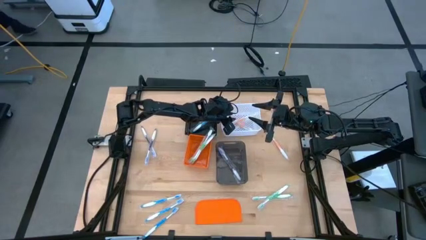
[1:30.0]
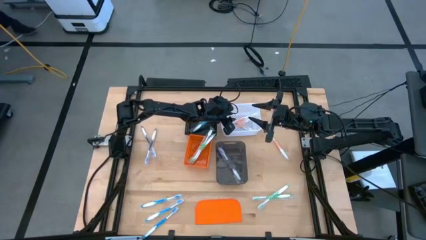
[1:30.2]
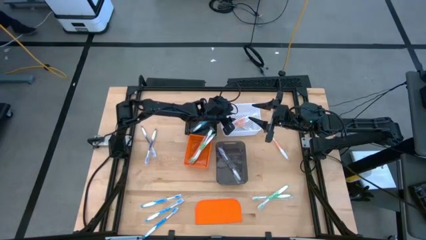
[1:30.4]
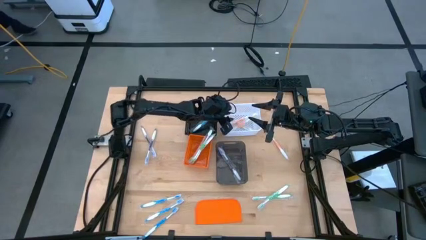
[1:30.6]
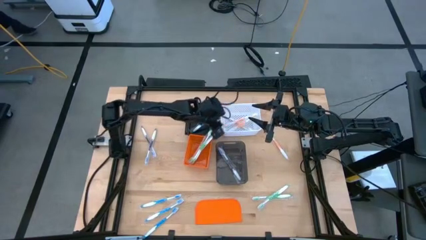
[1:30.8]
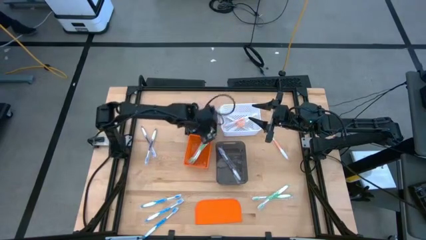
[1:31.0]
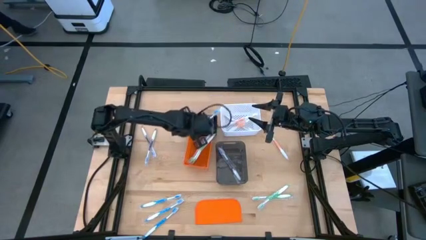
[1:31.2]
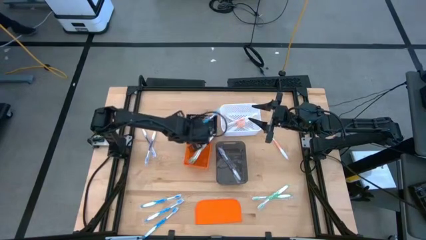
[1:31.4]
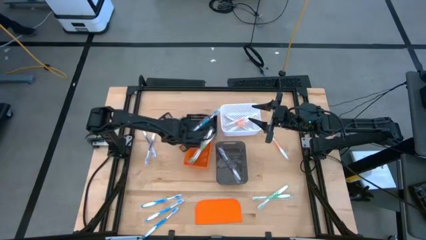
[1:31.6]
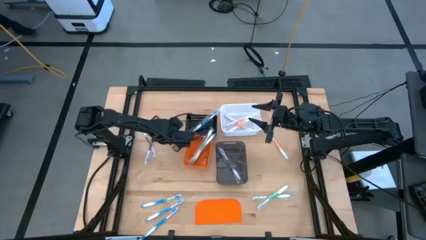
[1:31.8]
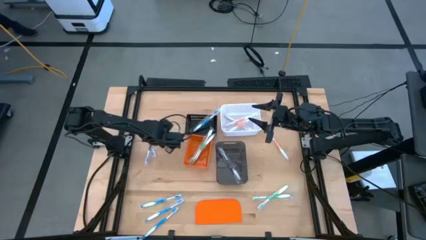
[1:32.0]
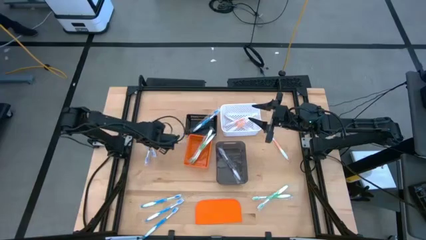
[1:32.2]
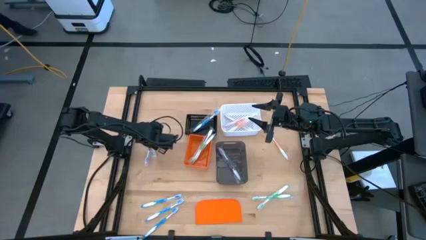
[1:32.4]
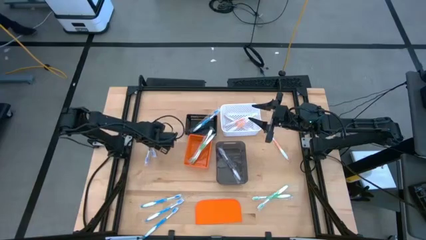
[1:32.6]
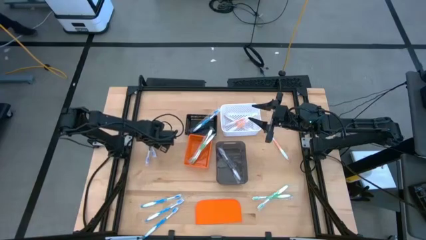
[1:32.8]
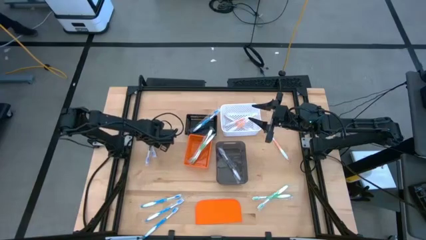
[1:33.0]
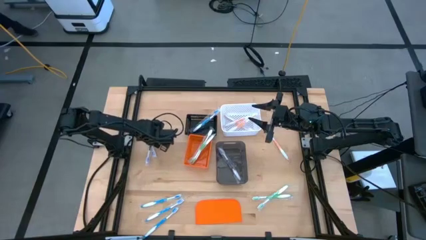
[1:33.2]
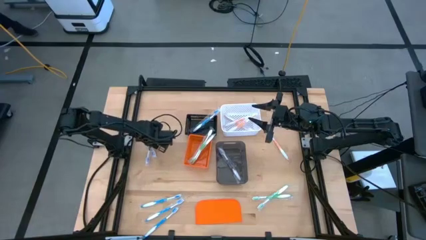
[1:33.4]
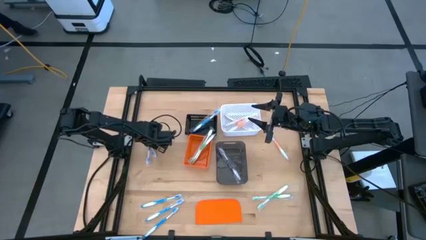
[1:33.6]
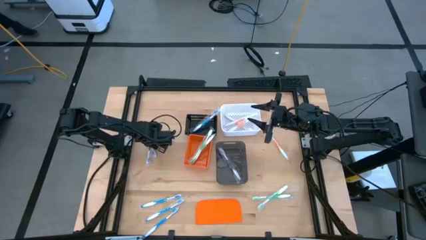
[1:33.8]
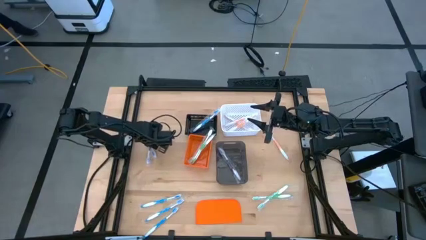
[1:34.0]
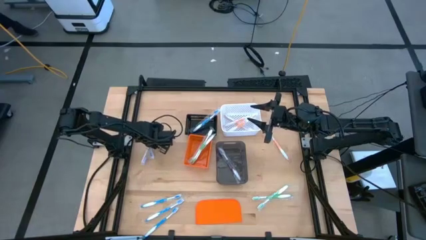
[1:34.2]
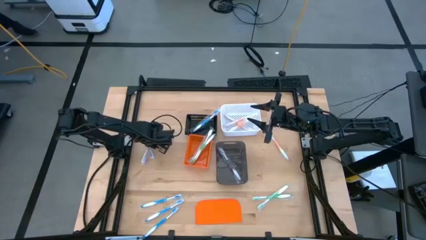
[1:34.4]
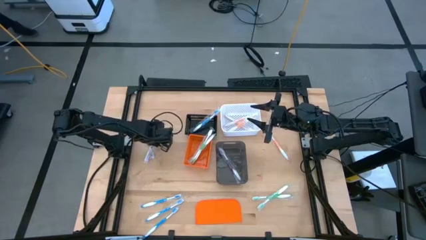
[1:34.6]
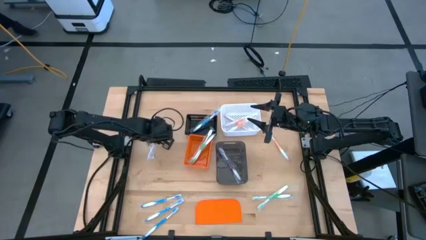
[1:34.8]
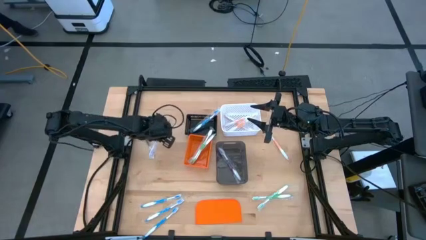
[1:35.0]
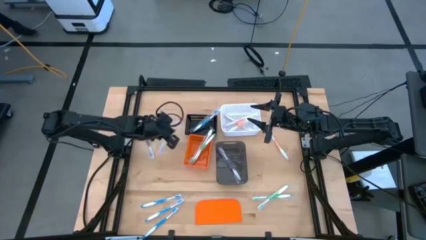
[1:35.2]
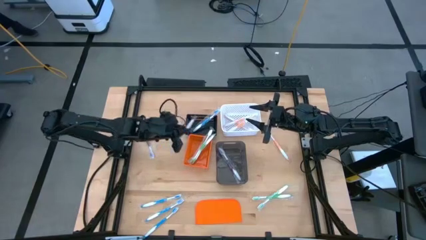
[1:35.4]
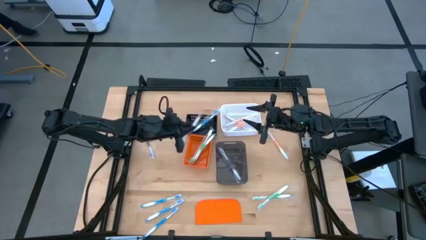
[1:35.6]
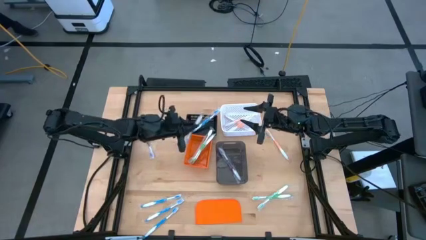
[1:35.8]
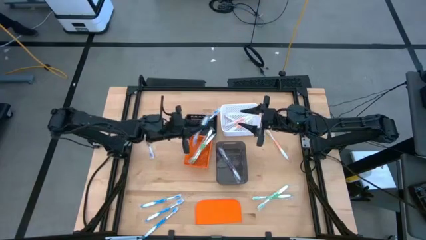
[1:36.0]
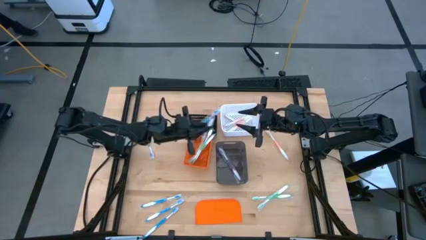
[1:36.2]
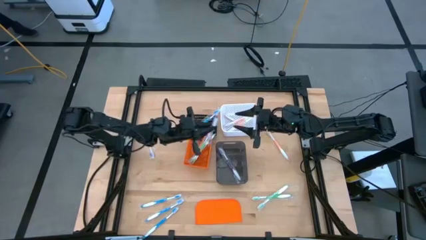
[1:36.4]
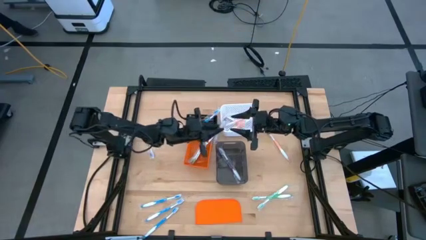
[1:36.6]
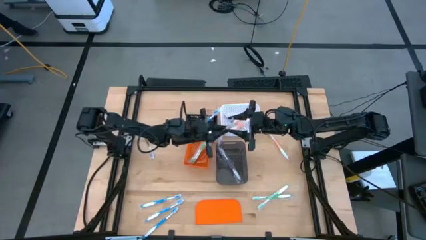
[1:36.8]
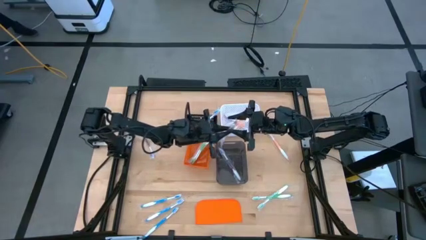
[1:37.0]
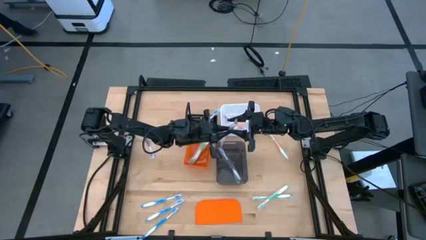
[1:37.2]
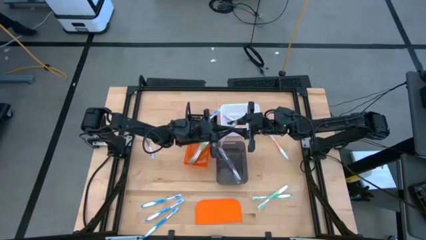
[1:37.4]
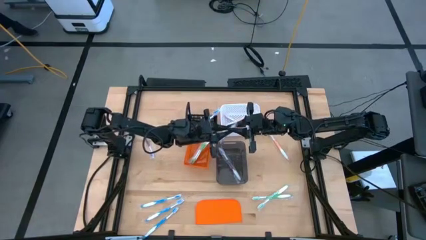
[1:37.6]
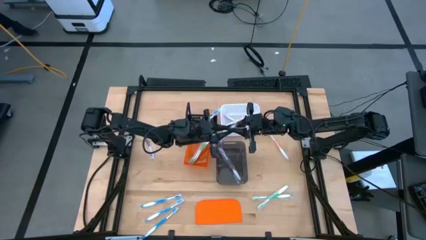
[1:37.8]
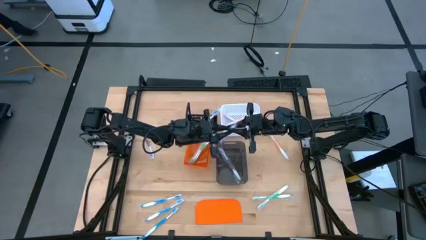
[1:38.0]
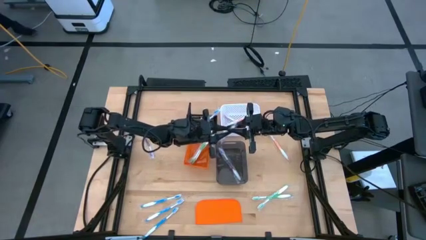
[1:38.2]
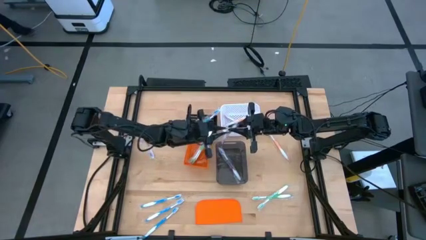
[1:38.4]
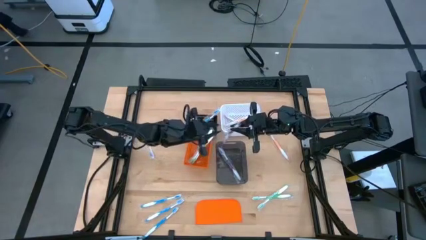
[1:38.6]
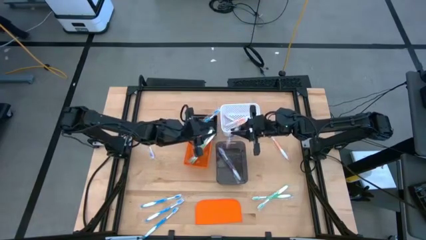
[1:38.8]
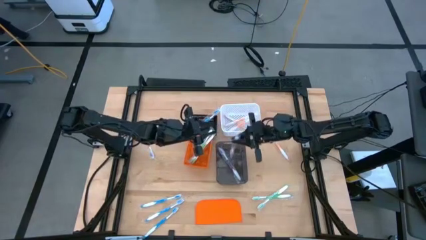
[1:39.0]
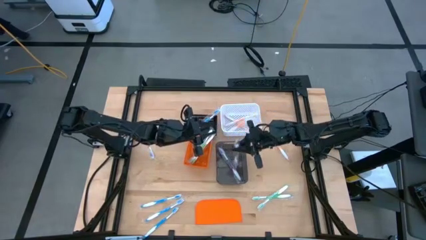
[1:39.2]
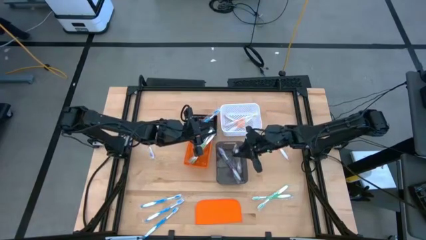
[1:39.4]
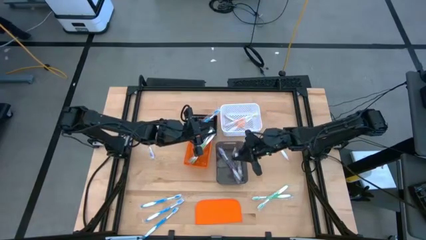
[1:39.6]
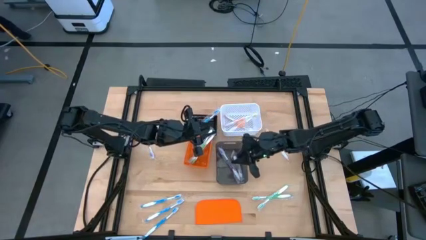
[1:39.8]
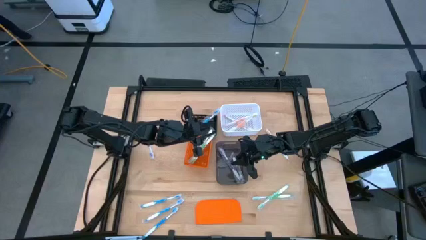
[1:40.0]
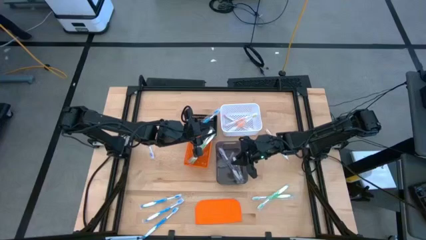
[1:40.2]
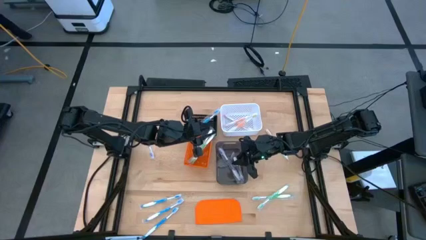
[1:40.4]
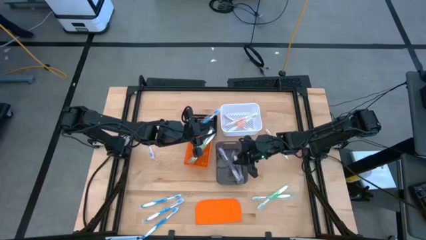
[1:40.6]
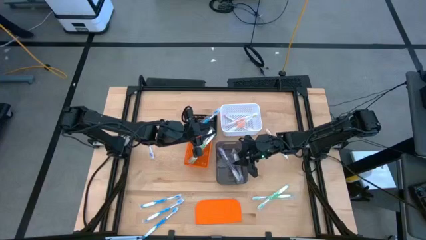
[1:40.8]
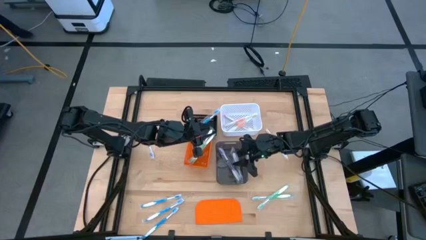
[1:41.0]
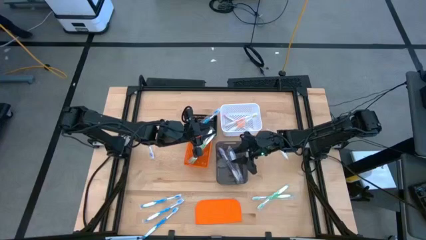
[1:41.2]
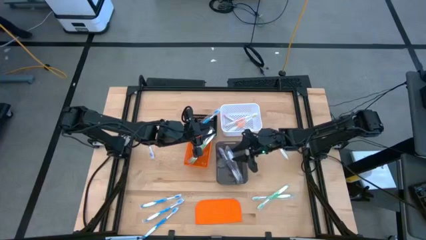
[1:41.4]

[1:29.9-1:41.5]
Task: Pick & Place Toothbrushes
Put the violet toothbrush into the transparent bin

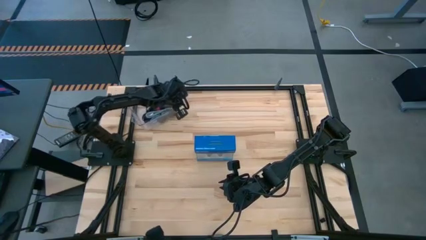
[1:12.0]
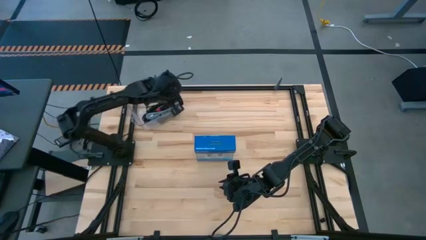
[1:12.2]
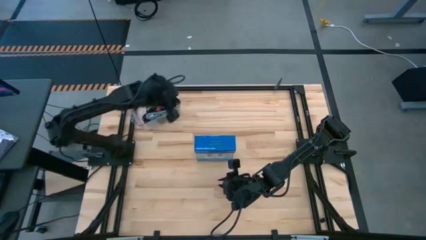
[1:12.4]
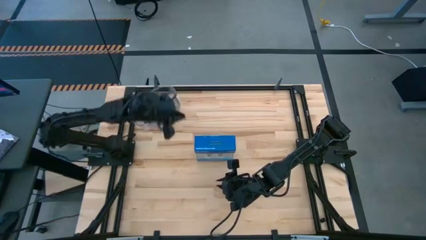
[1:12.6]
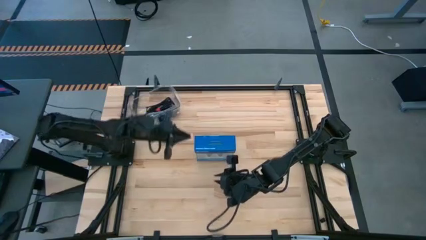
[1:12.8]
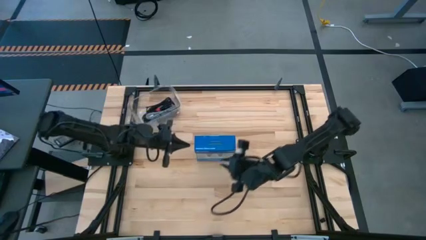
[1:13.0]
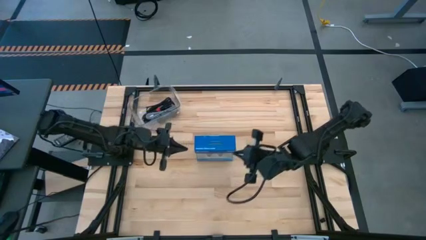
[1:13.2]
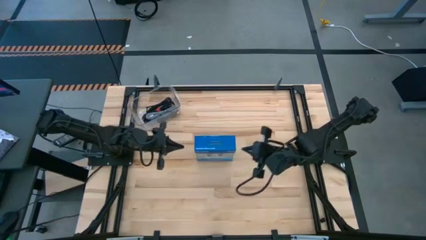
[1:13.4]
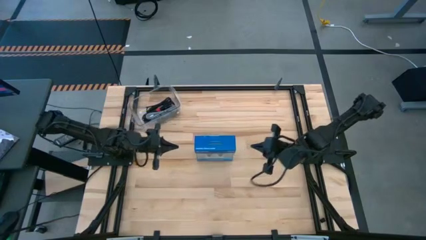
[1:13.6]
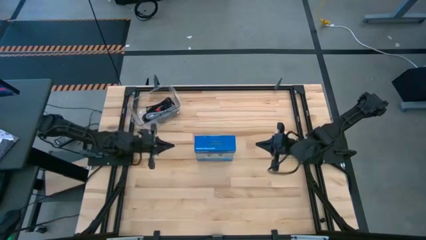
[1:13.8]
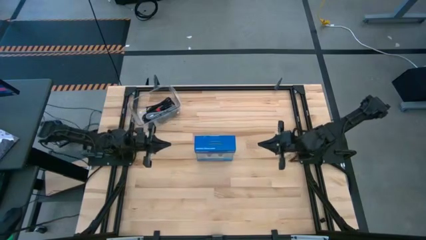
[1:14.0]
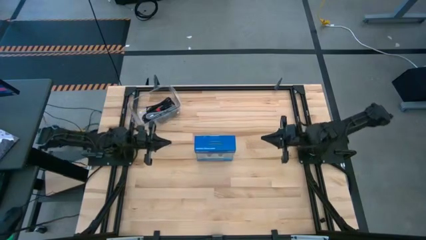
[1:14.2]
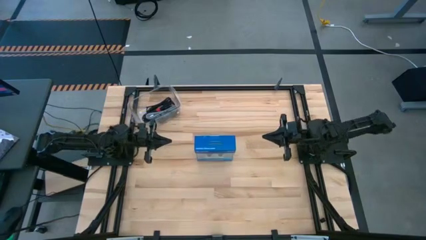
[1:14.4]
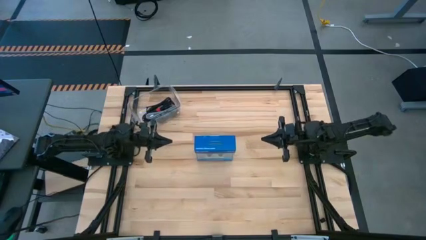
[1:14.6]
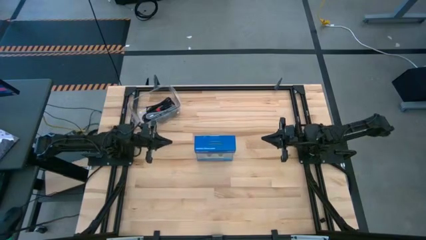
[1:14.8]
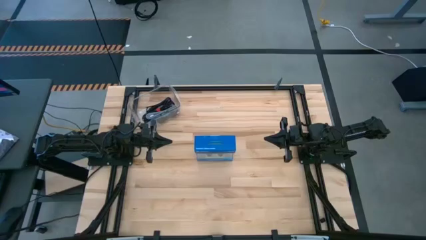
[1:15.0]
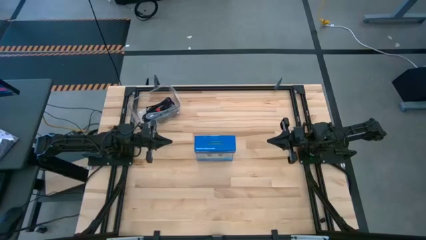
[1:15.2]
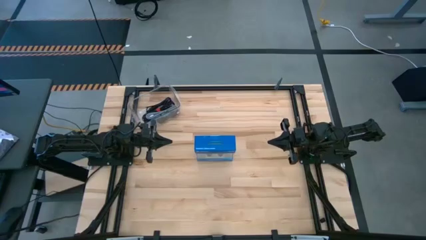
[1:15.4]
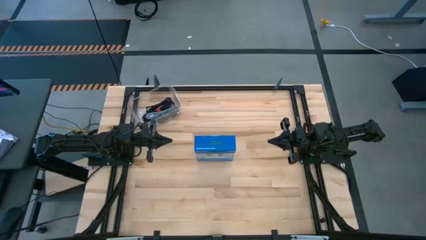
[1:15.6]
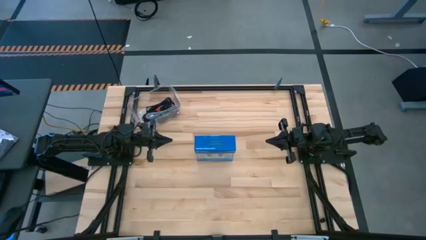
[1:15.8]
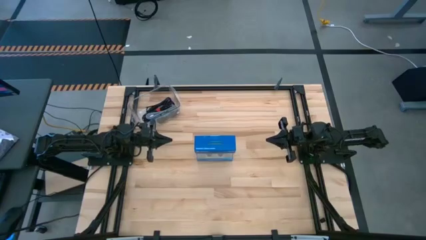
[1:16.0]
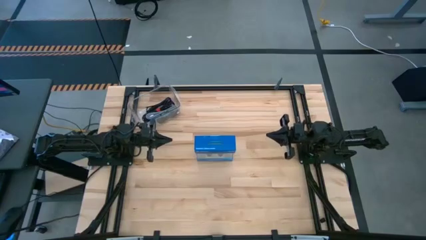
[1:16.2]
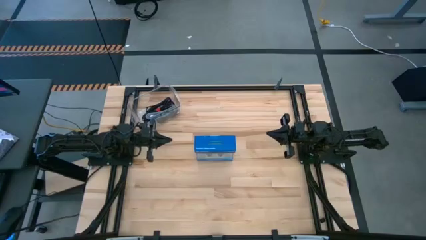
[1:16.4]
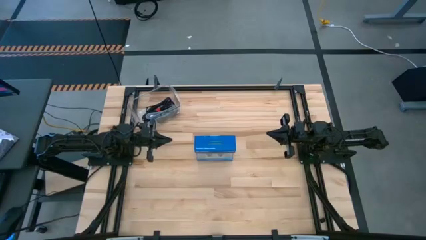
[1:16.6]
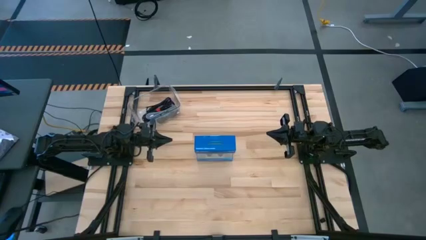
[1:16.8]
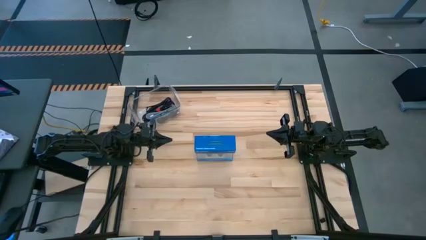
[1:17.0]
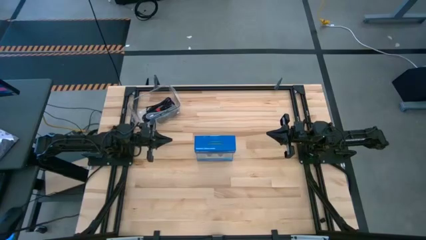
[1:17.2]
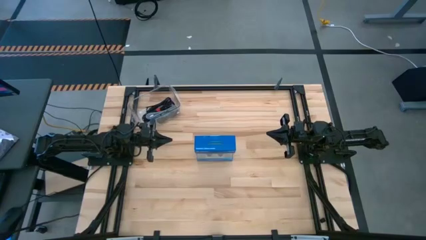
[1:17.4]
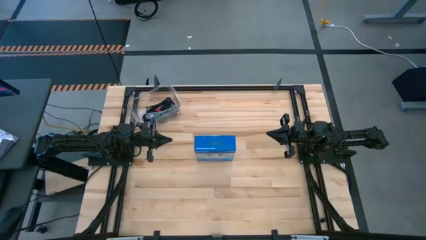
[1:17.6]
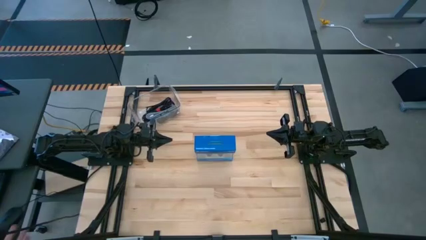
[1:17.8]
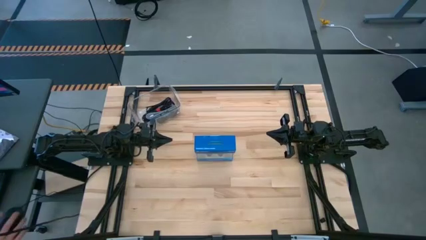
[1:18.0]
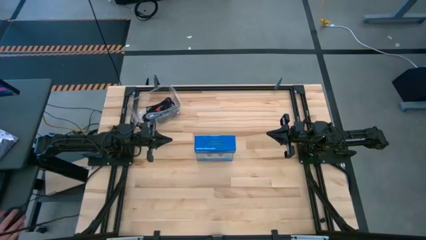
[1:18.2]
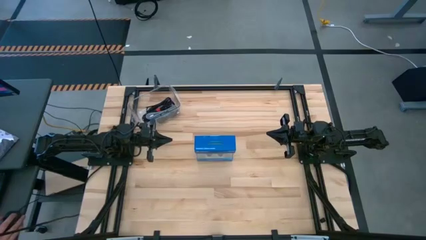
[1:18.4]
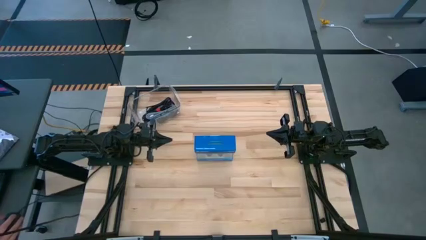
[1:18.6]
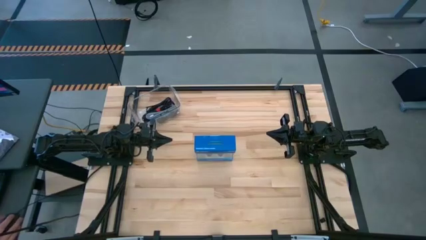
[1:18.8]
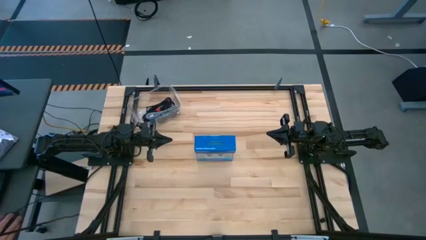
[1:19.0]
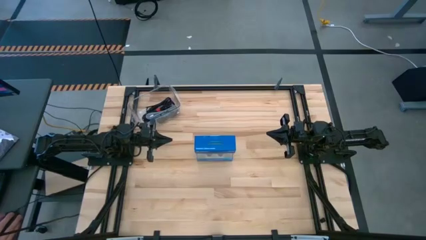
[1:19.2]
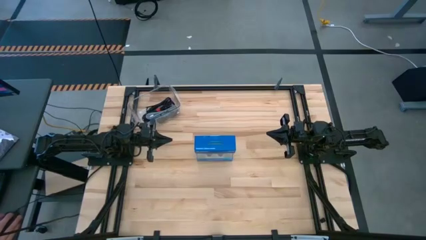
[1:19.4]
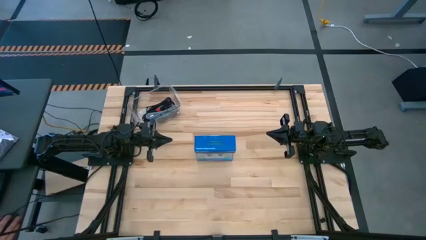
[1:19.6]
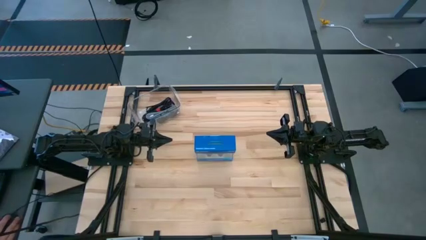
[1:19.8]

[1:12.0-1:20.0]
Task: Pick and place USB-C Cables
Return to Home Position
